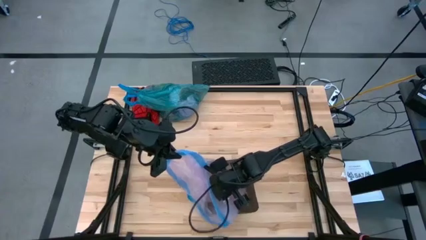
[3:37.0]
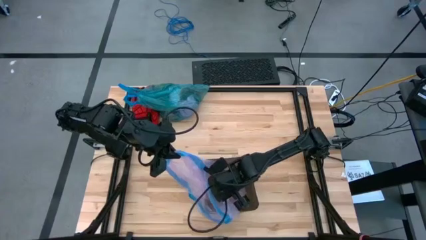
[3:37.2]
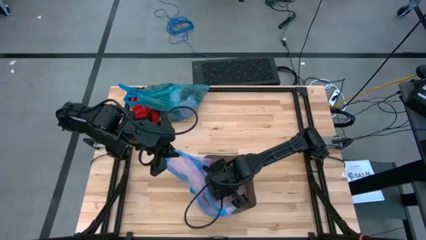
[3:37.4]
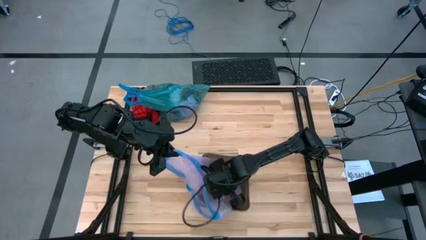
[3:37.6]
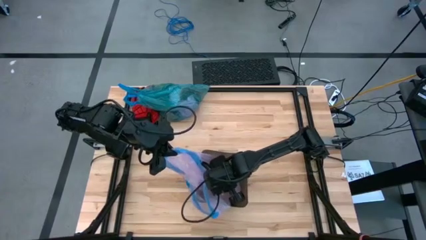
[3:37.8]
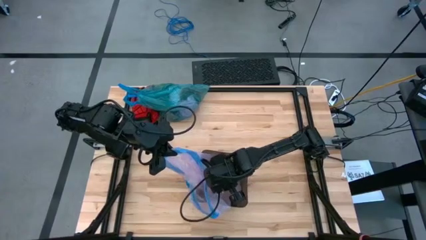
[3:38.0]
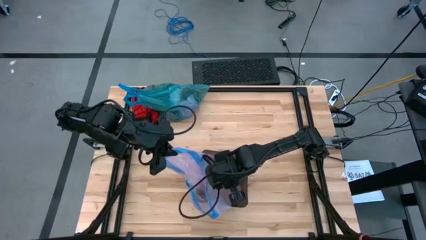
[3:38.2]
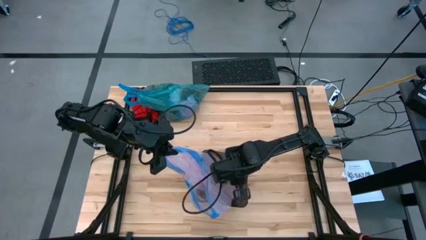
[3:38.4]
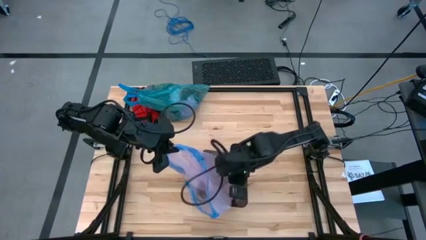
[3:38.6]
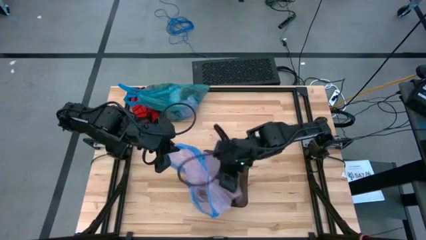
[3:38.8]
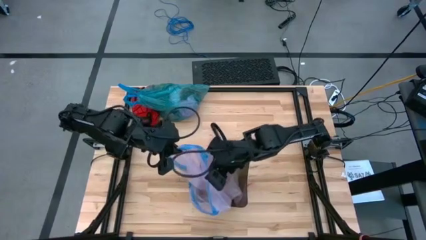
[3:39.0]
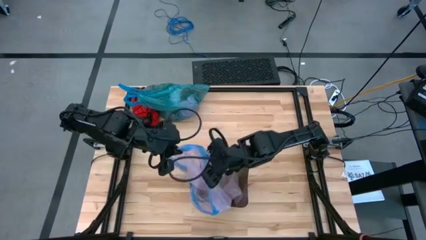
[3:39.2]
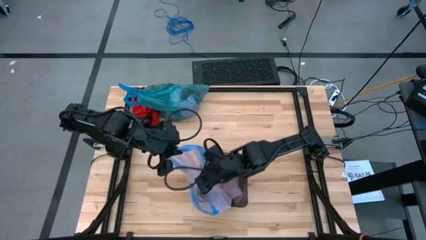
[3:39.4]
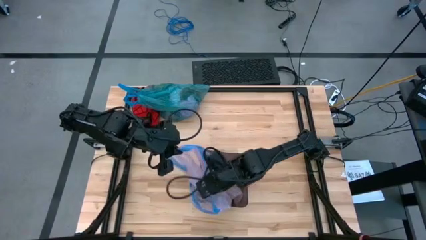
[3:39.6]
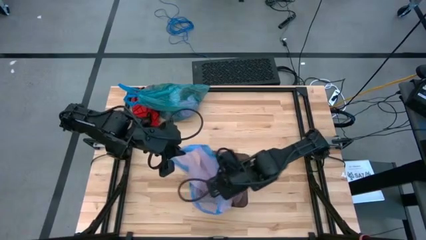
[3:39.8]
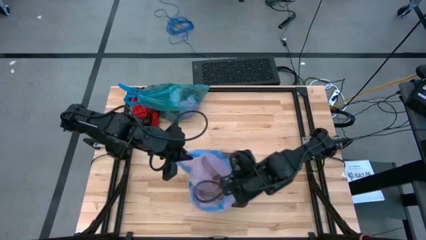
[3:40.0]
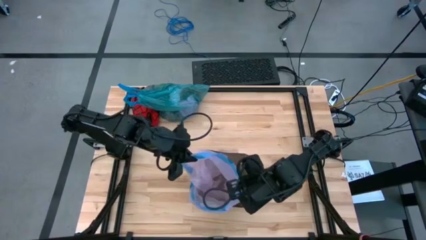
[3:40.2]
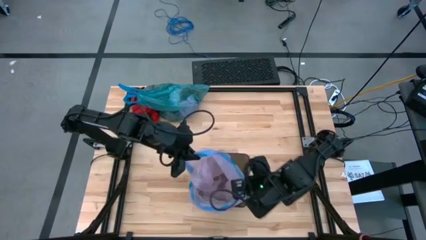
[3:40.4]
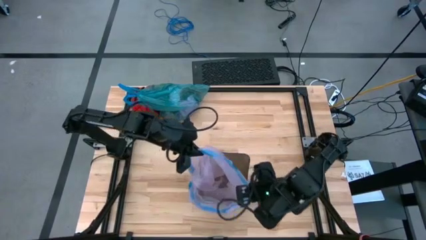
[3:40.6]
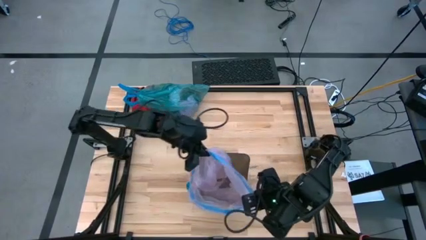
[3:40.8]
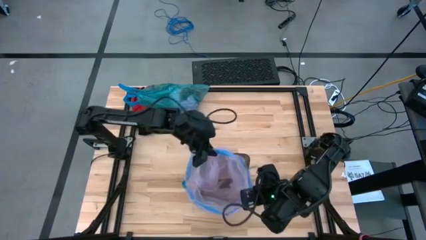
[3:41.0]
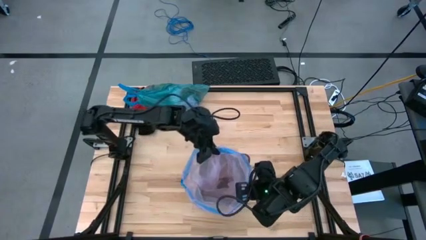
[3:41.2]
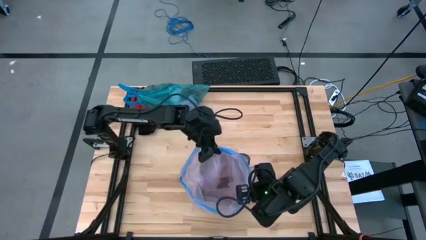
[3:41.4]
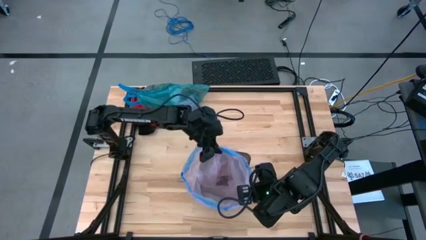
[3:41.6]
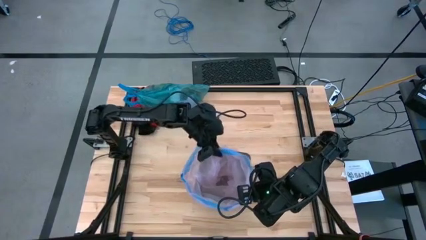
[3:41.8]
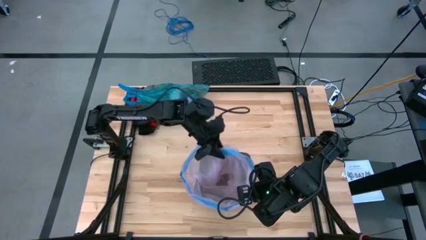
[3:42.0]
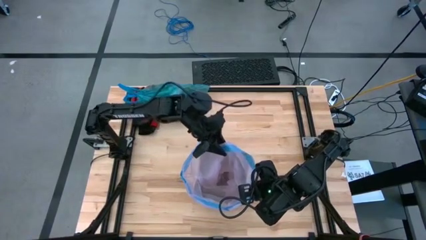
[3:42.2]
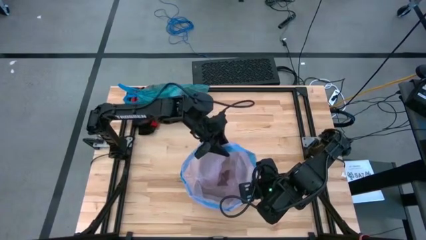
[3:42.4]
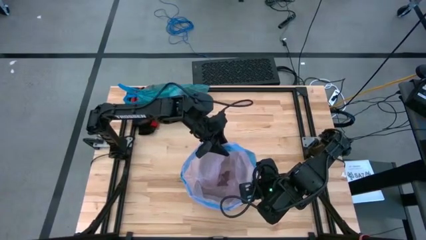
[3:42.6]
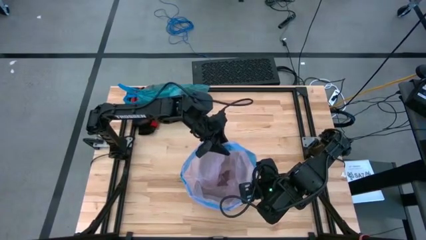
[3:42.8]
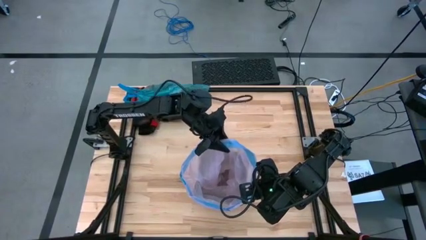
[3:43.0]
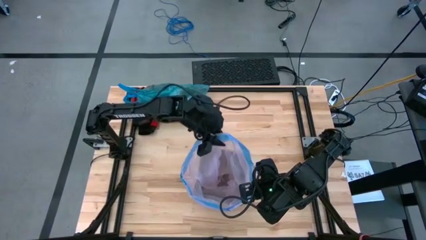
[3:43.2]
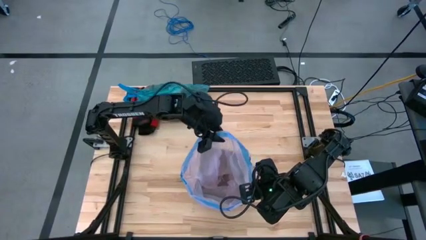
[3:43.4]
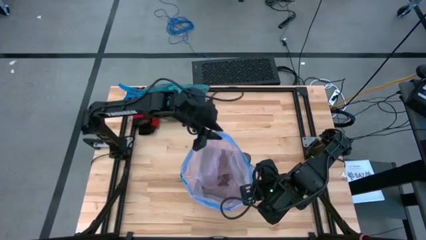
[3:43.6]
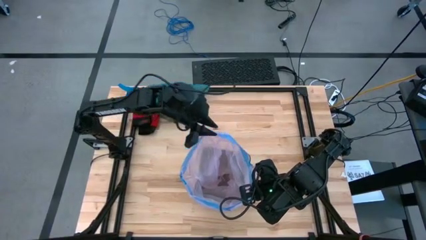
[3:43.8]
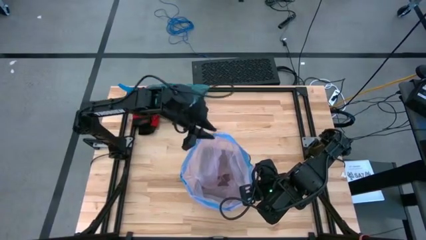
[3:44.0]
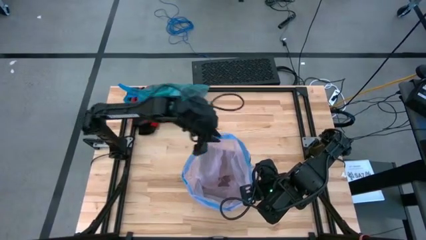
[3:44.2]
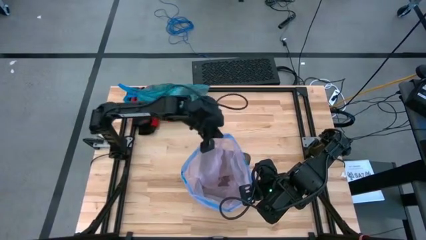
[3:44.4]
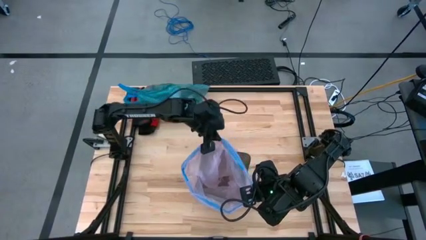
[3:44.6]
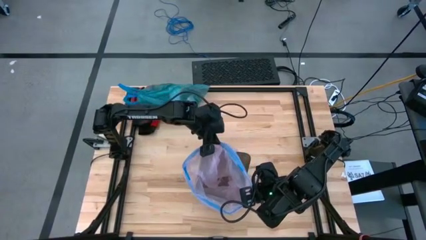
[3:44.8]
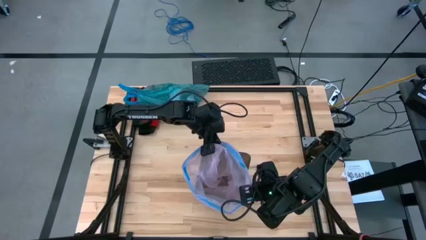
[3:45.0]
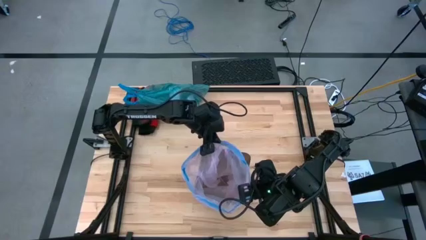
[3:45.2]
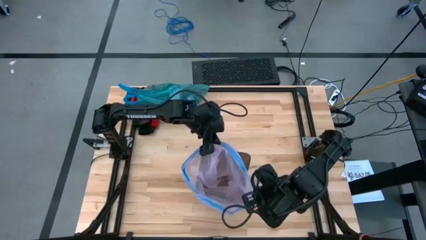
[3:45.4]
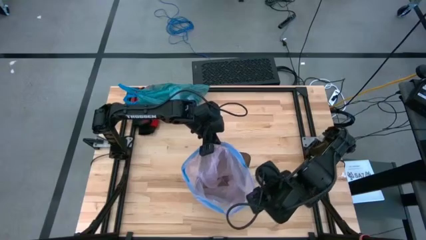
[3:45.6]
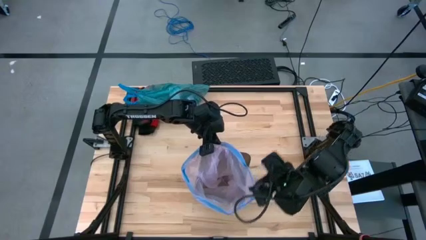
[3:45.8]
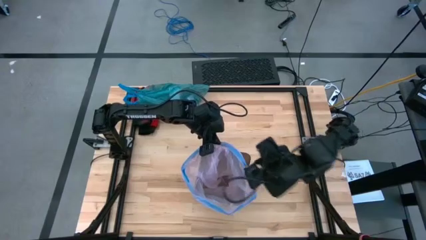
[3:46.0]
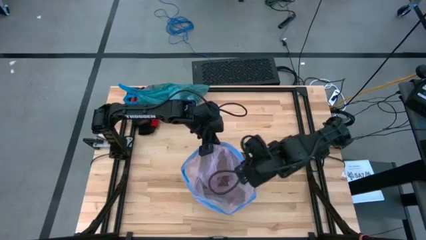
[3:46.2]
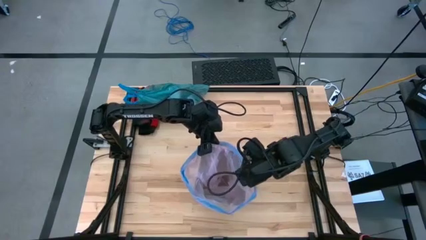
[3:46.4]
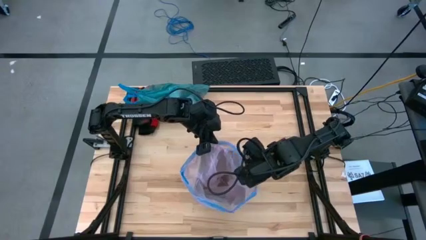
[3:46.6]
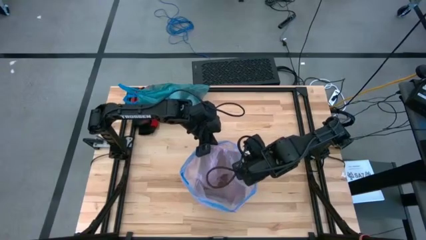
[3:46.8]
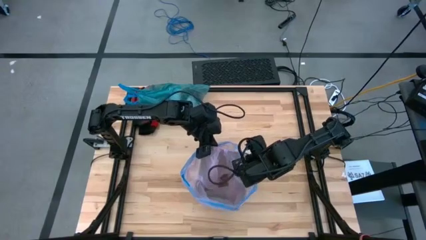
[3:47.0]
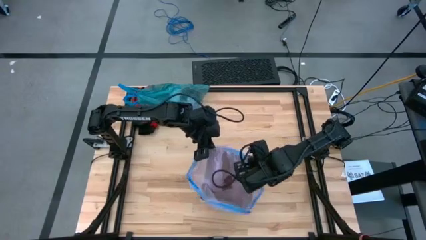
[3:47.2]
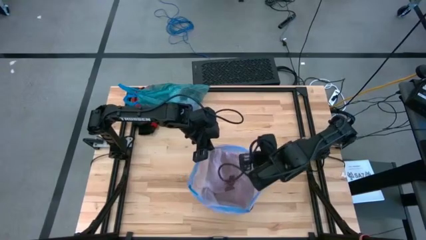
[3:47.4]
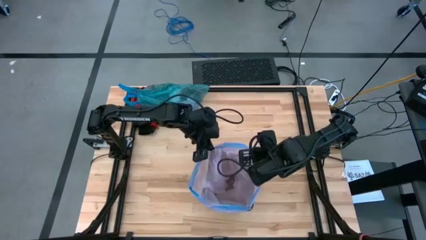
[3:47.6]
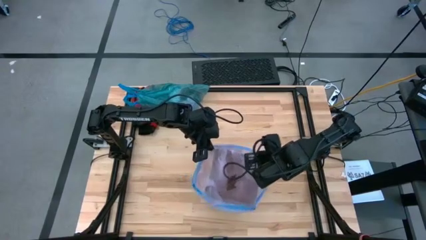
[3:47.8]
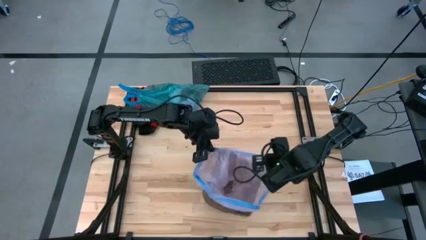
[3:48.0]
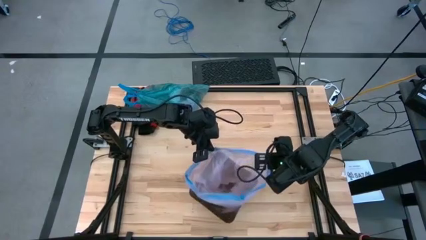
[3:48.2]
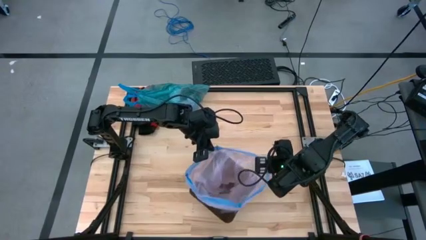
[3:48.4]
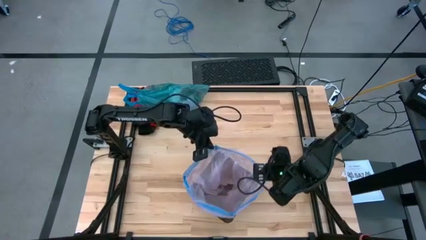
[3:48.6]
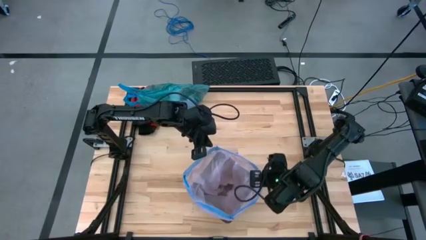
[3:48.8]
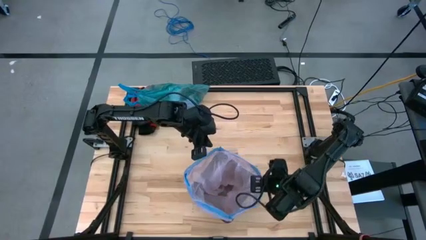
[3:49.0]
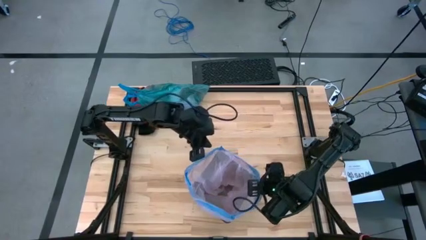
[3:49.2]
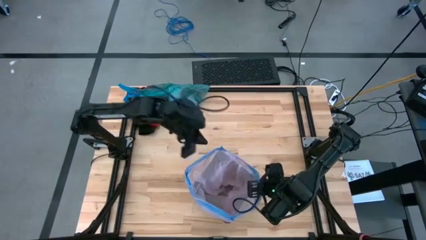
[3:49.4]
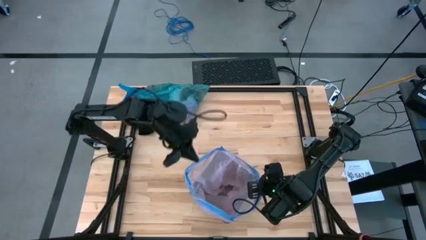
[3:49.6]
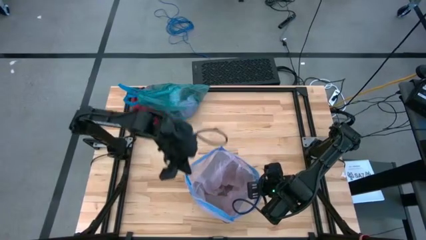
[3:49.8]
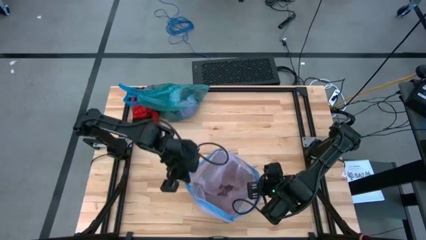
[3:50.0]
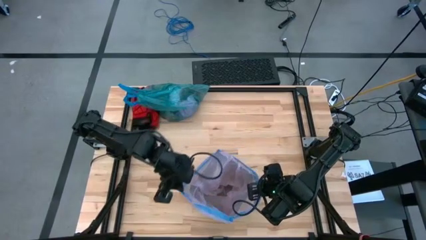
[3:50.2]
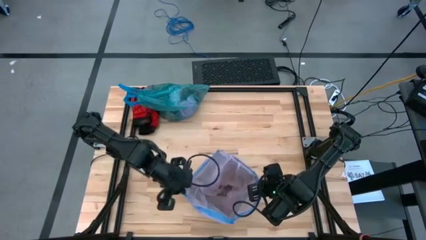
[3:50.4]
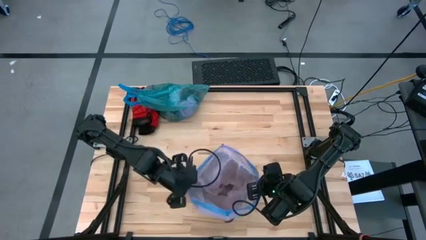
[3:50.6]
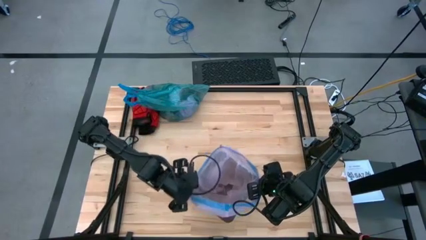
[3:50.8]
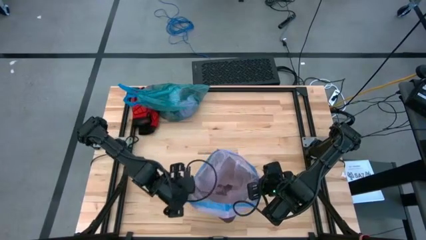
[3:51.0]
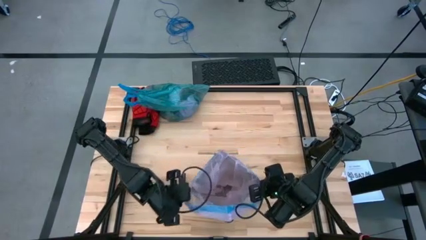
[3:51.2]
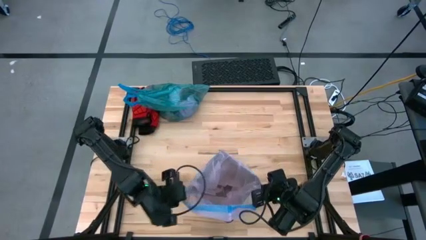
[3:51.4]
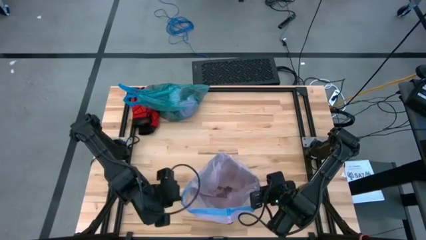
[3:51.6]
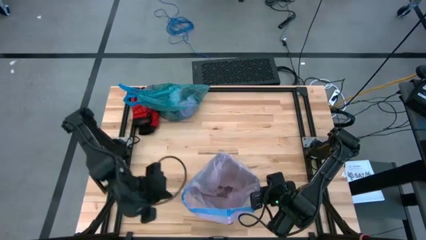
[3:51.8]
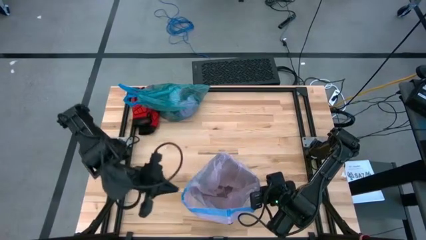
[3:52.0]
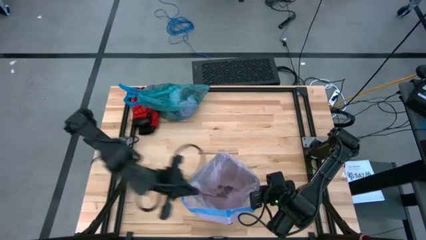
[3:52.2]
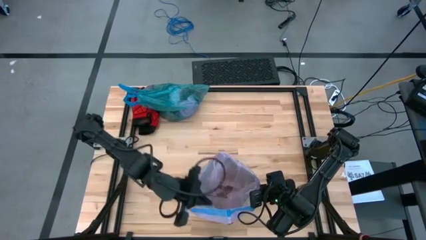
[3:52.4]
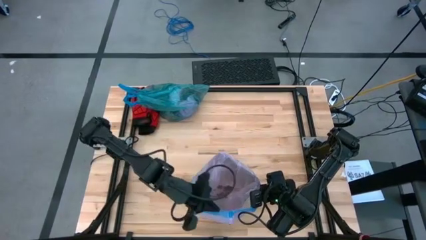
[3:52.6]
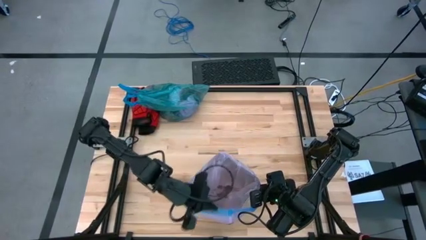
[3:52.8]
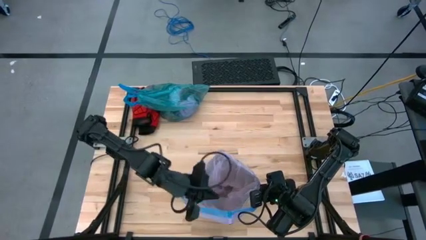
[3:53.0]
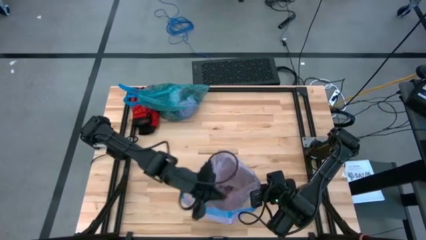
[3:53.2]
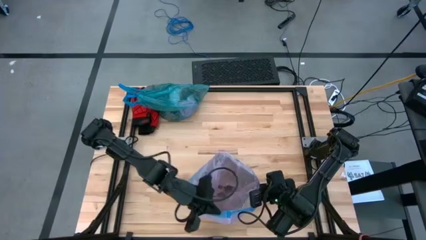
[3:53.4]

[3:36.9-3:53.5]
Task: place trash/remove bag and relplace
Insert the new pink trash bag into the black trash bin
